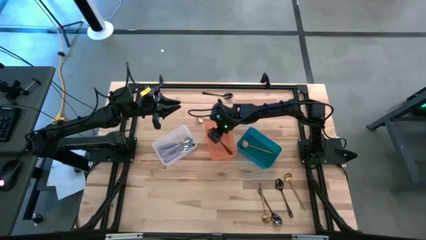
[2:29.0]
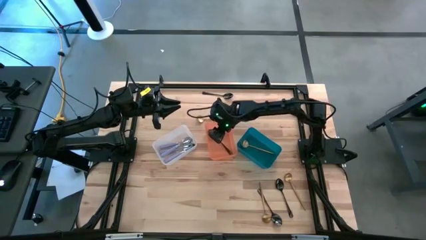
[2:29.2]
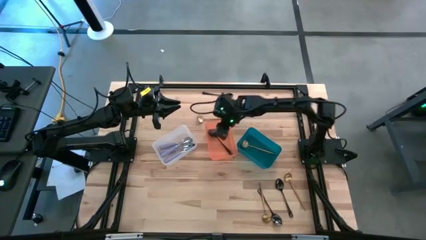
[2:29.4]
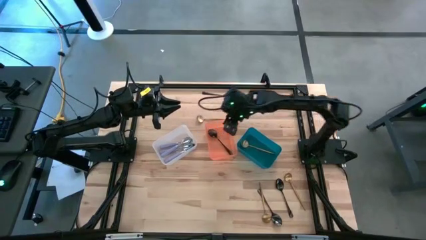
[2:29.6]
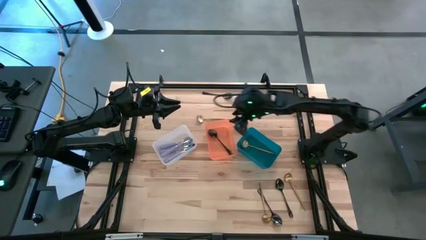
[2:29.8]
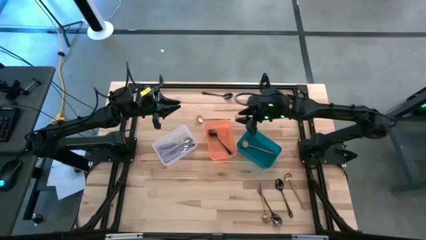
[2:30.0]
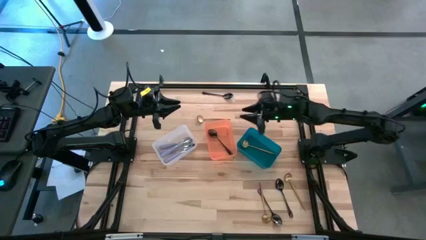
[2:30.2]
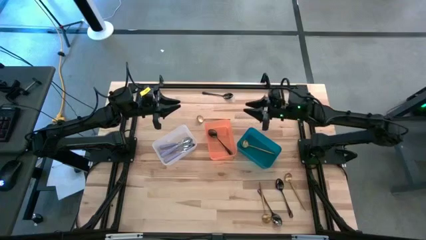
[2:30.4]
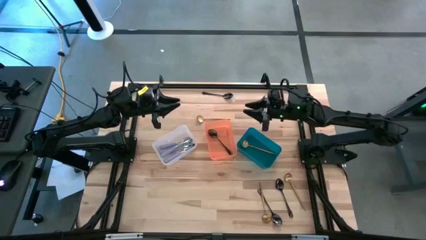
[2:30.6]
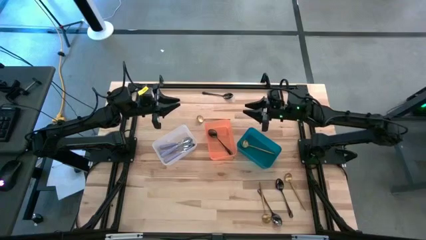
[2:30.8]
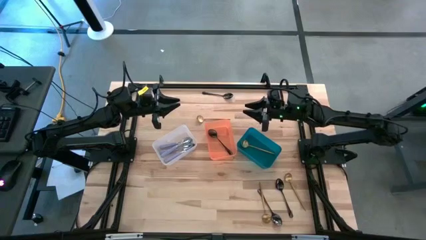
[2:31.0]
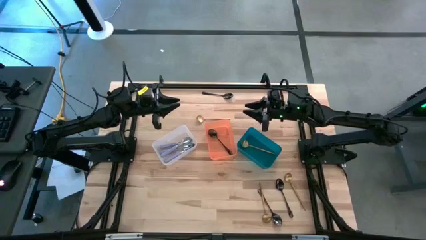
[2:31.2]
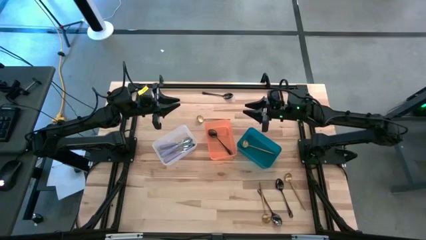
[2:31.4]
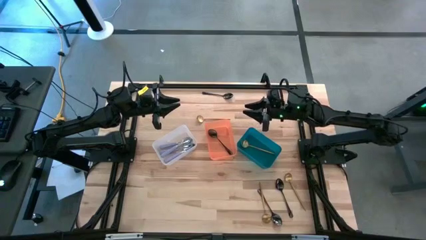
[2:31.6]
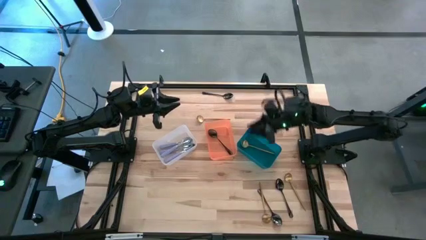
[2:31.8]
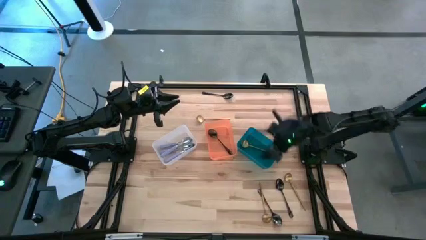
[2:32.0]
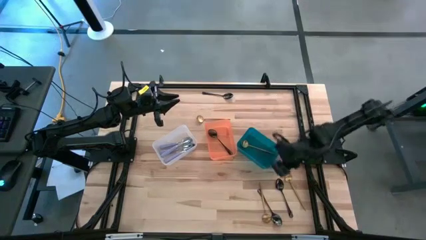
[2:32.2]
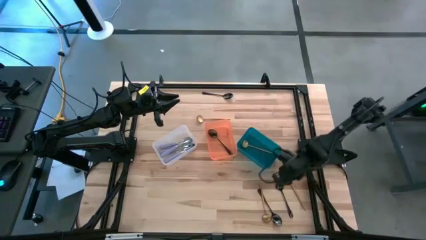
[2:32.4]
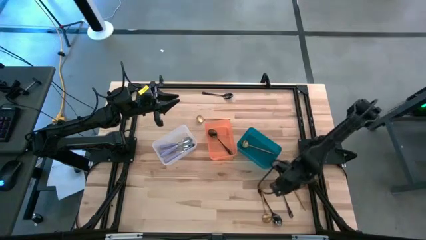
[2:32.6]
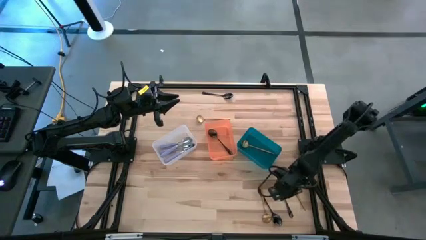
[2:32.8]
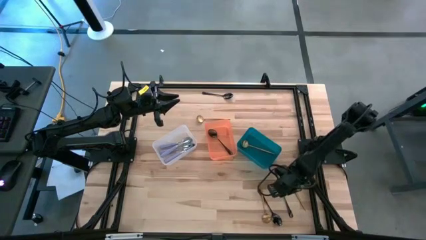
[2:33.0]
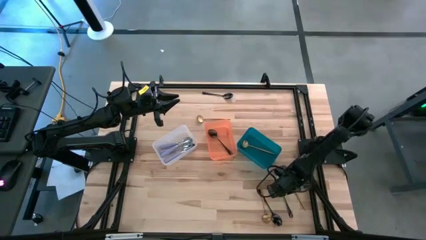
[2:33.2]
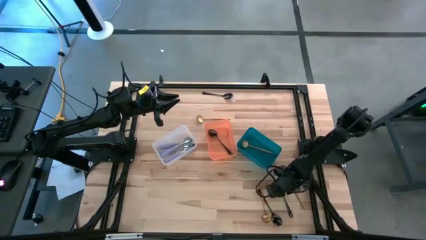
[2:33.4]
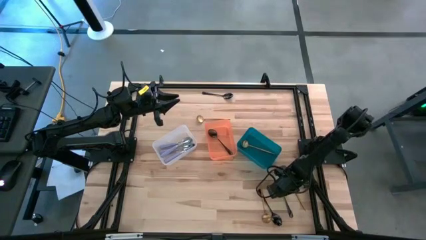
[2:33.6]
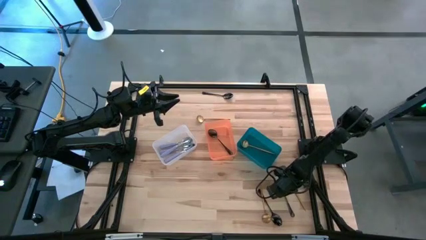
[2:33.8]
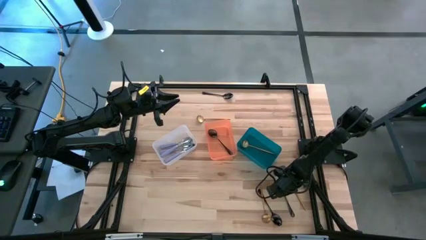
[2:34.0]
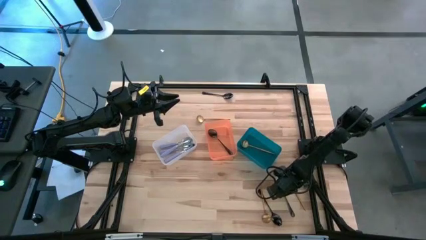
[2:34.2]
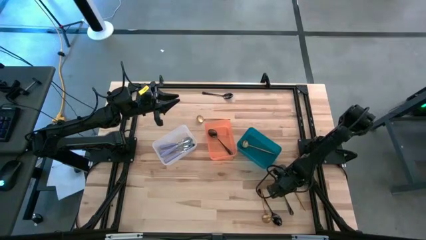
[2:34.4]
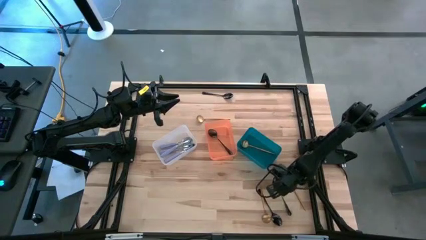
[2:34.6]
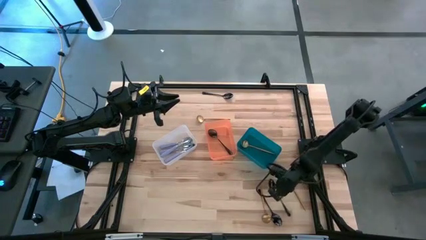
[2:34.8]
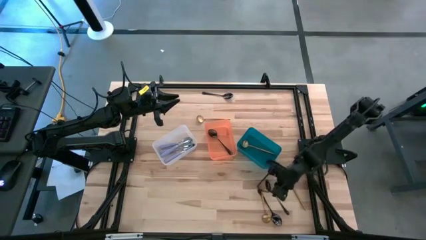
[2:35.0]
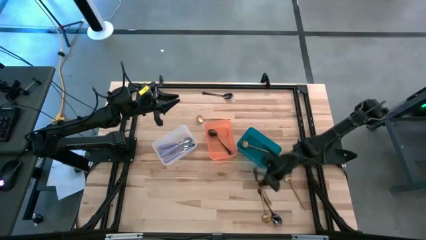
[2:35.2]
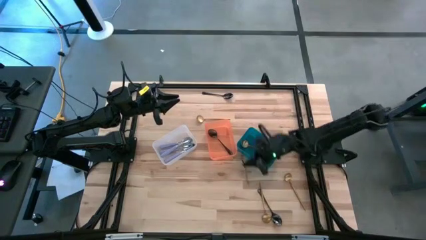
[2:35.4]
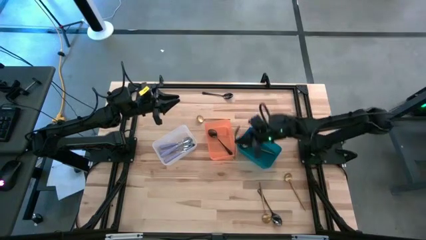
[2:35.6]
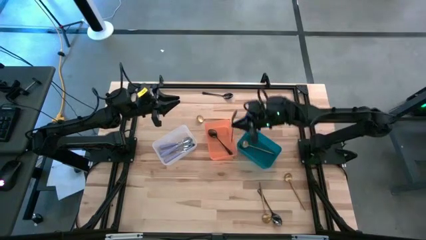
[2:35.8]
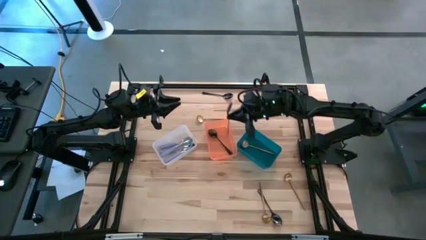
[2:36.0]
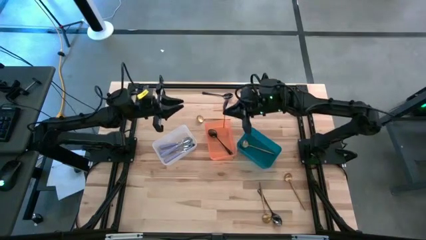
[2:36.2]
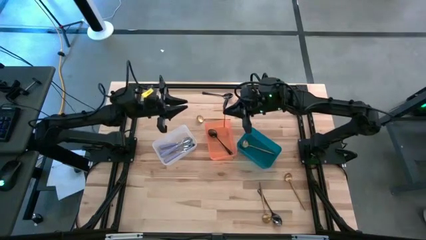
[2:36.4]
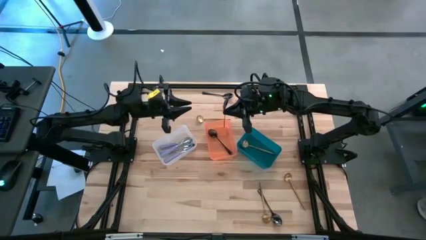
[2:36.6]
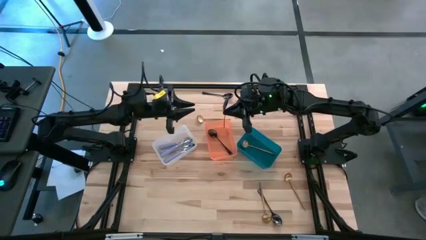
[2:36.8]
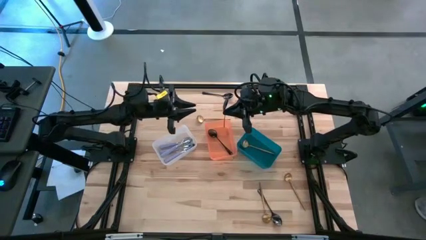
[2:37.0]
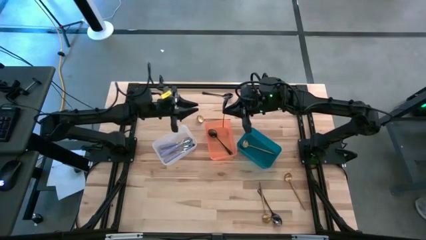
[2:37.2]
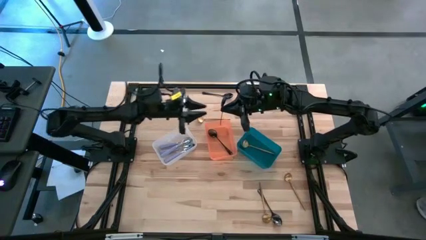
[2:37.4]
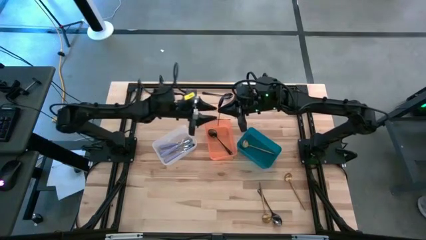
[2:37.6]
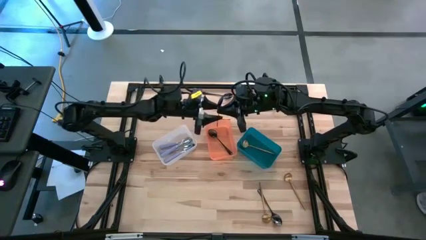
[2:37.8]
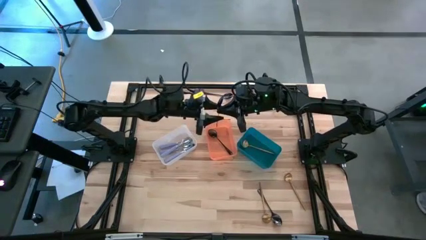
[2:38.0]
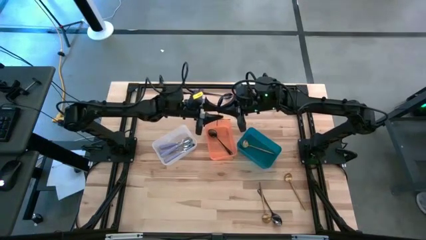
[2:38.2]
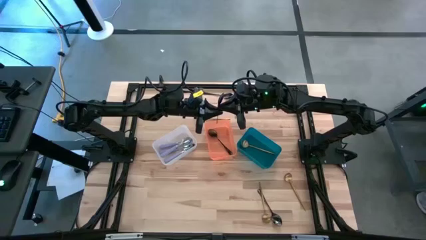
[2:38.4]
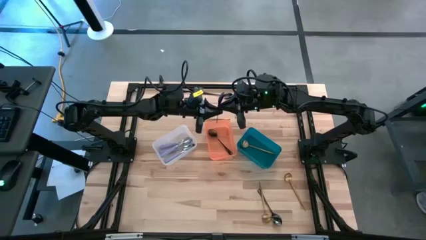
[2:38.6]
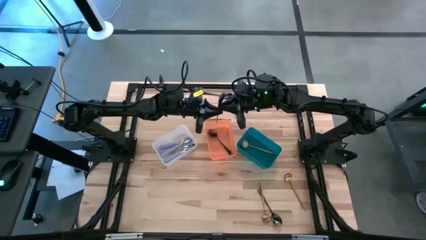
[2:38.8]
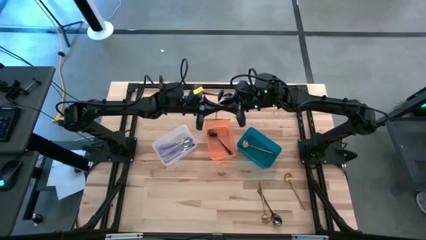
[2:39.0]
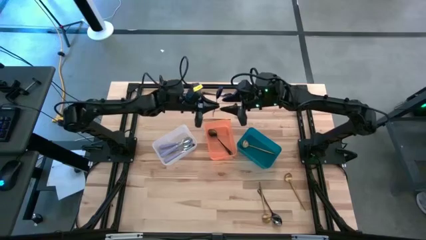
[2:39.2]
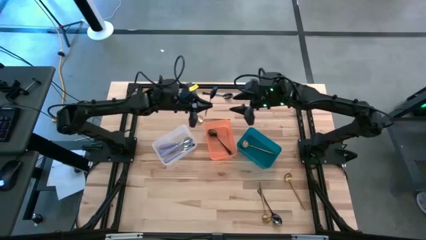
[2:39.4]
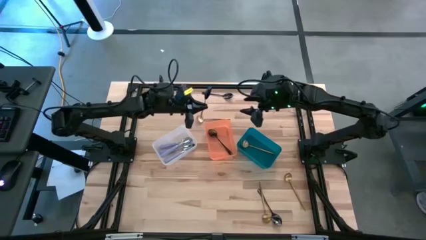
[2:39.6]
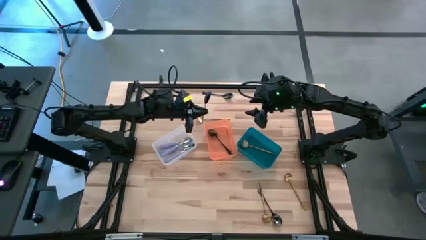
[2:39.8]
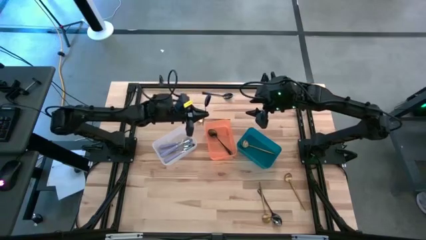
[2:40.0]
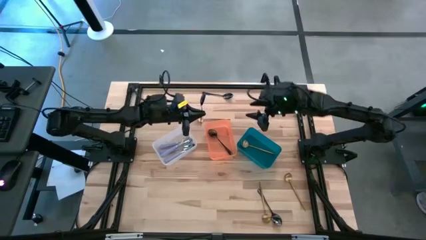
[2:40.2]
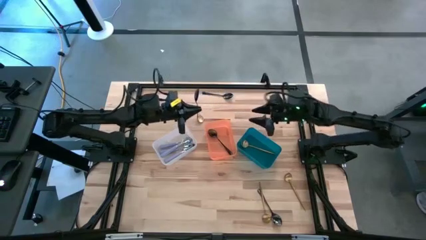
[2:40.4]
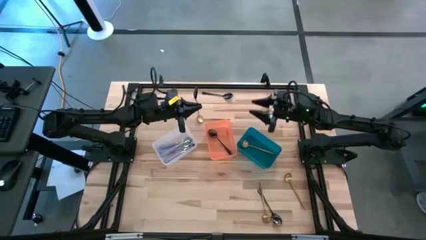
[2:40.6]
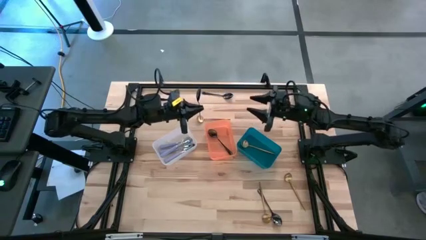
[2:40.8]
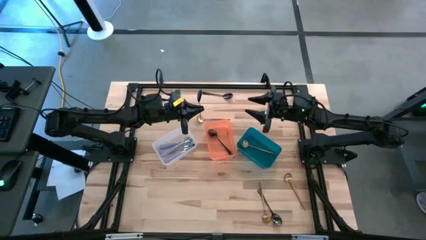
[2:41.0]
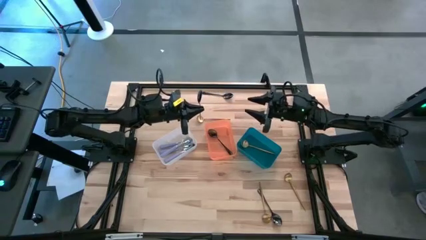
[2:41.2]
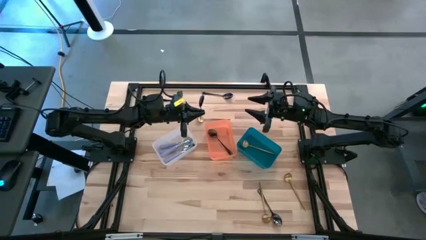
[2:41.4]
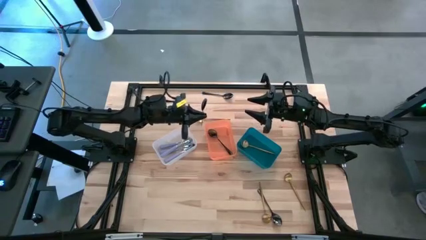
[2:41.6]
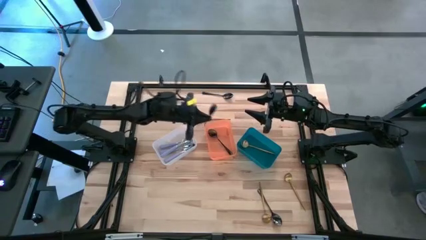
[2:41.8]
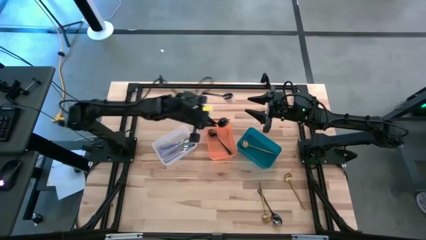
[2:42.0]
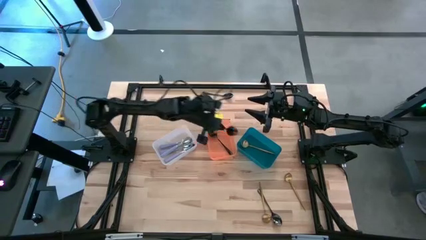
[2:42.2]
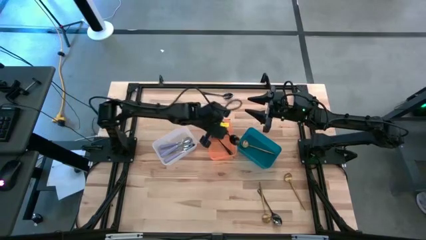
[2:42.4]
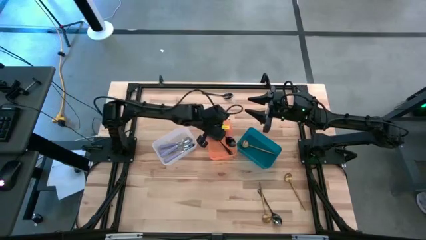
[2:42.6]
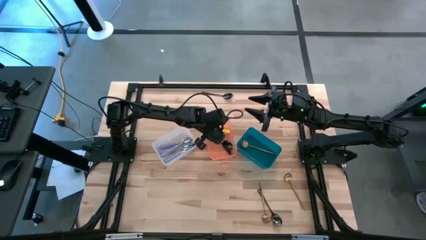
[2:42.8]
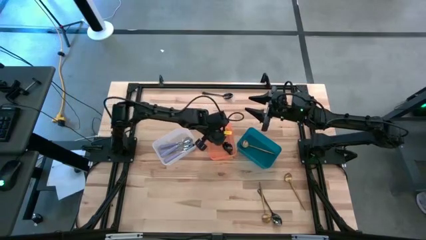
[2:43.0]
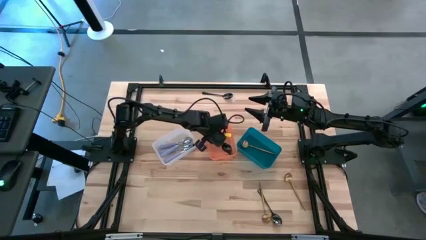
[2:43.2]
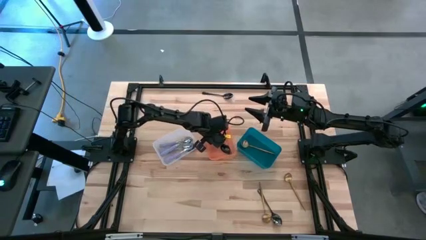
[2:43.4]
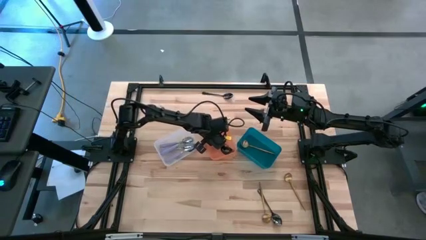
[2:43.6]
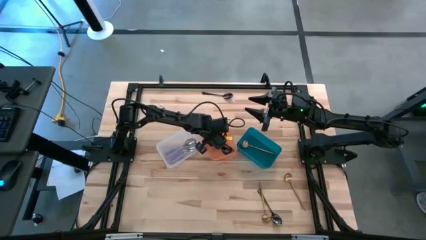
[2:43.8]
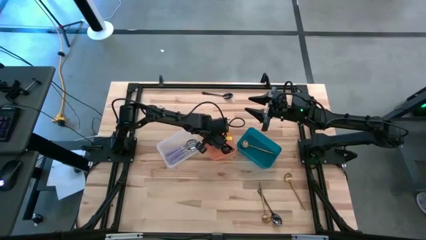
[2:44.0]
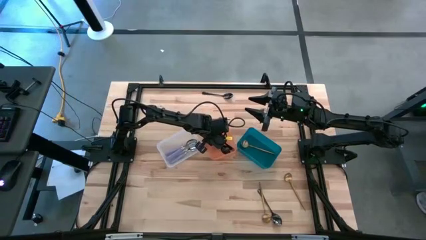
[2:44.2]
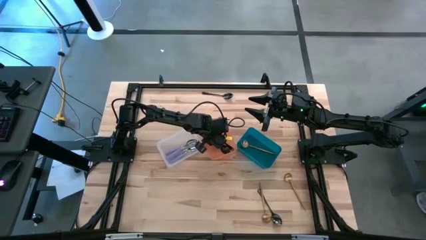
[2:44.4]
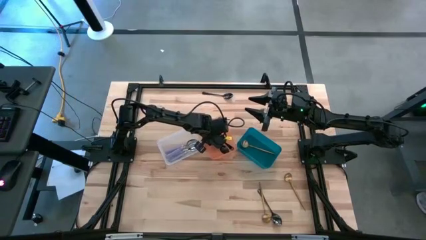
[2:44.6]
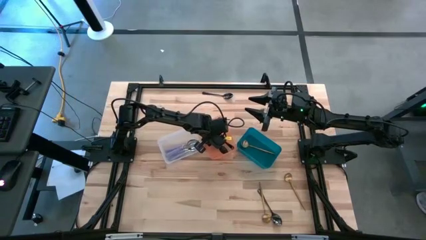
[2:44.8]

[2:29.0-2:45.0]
Task: Sort silverware by color (type)
Put the black spoon into the orange bin
